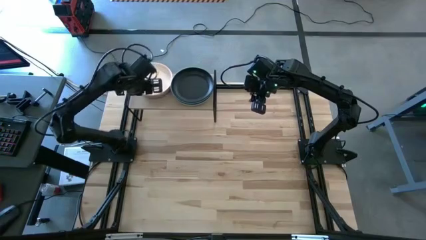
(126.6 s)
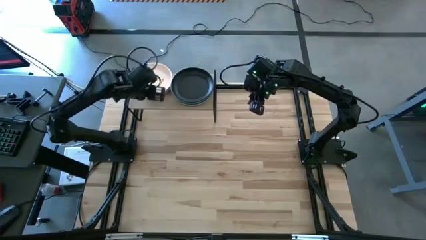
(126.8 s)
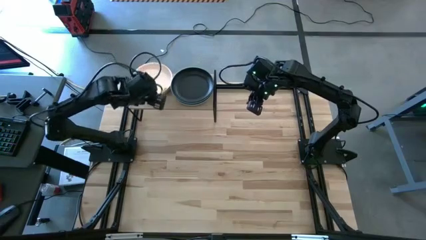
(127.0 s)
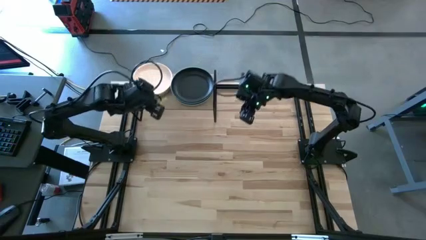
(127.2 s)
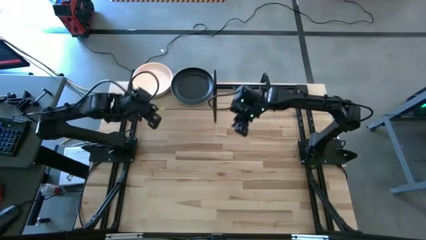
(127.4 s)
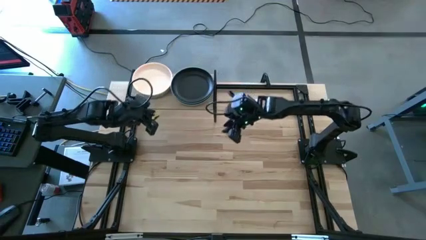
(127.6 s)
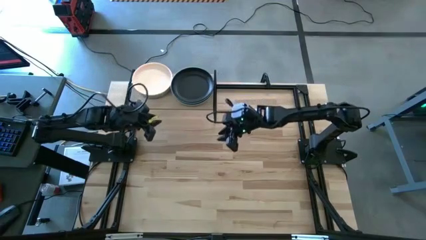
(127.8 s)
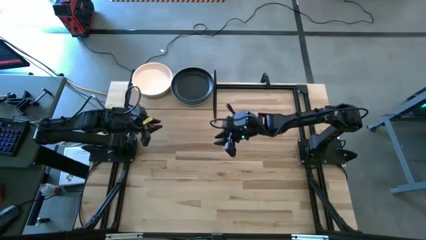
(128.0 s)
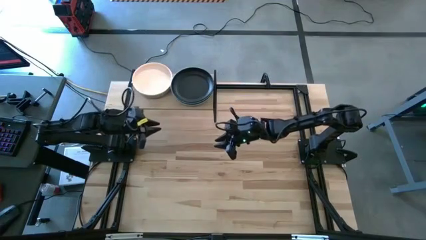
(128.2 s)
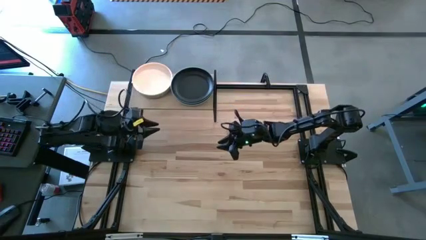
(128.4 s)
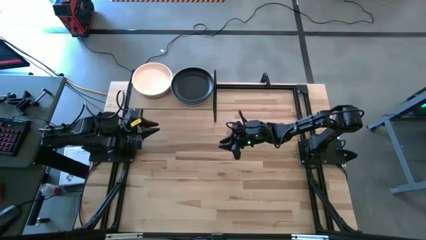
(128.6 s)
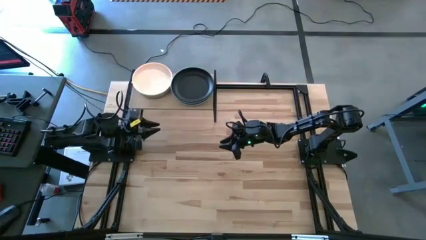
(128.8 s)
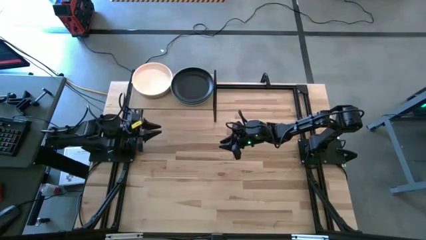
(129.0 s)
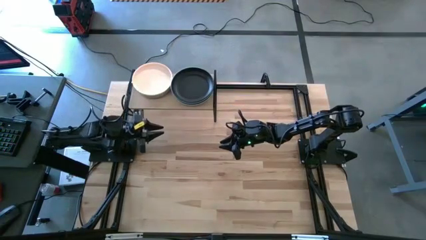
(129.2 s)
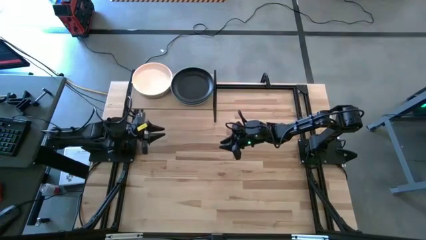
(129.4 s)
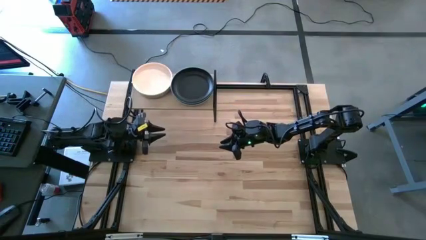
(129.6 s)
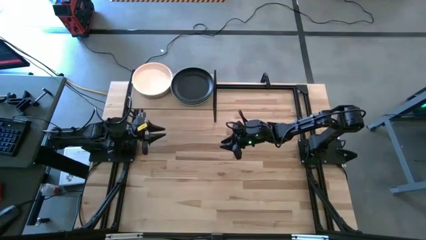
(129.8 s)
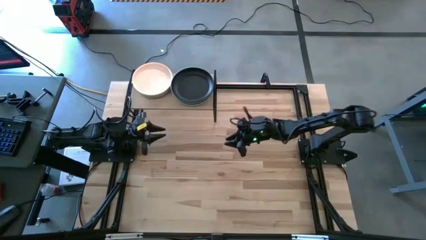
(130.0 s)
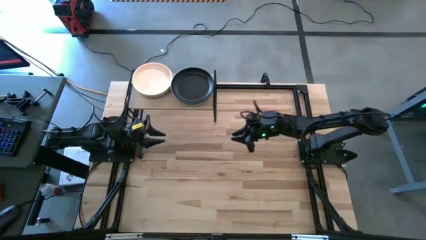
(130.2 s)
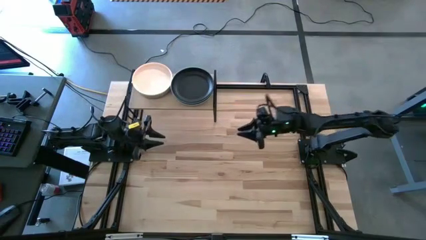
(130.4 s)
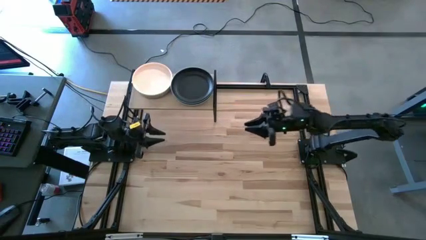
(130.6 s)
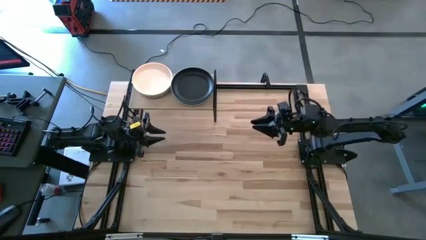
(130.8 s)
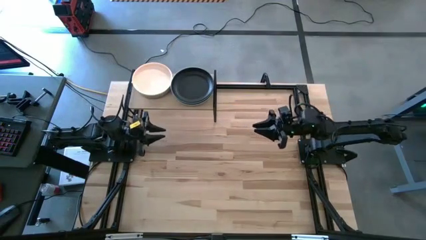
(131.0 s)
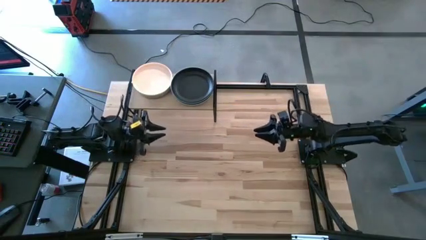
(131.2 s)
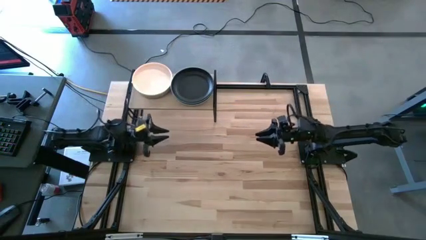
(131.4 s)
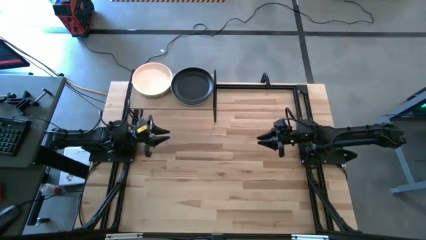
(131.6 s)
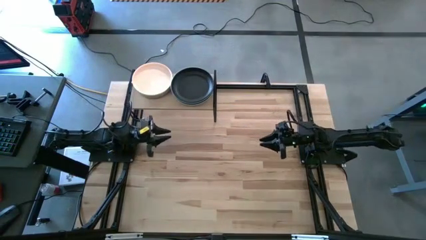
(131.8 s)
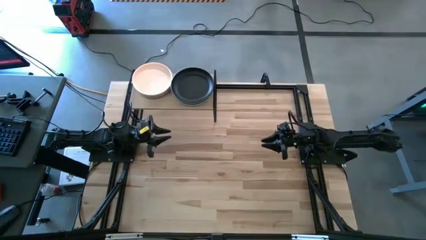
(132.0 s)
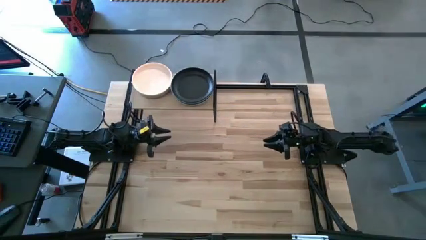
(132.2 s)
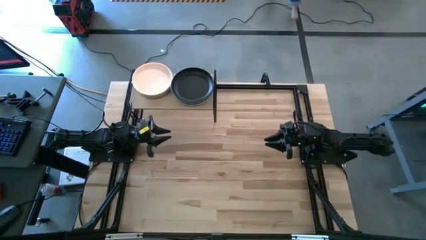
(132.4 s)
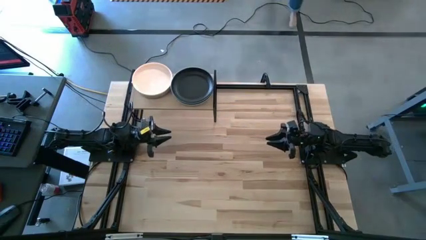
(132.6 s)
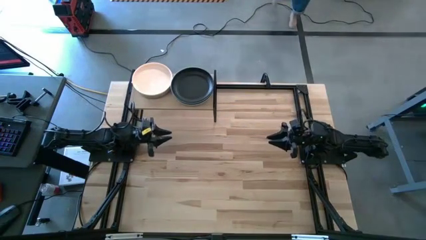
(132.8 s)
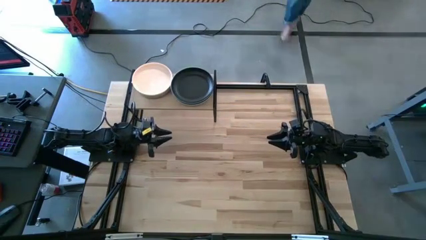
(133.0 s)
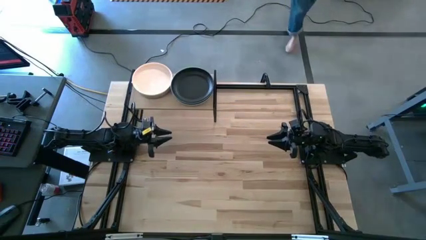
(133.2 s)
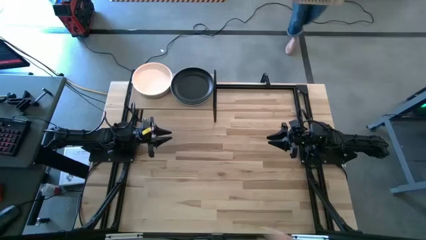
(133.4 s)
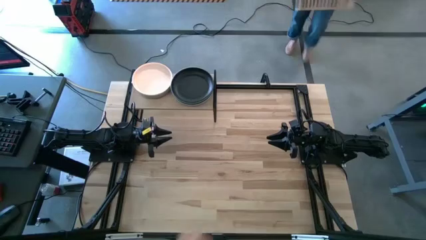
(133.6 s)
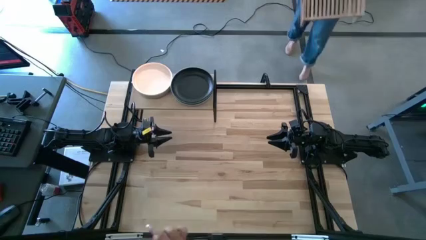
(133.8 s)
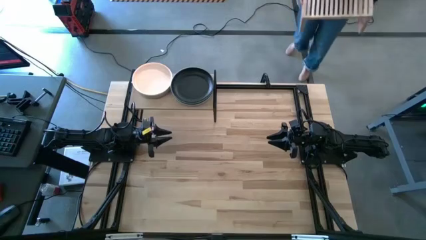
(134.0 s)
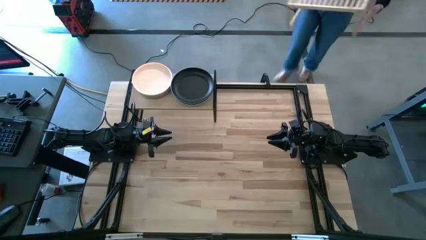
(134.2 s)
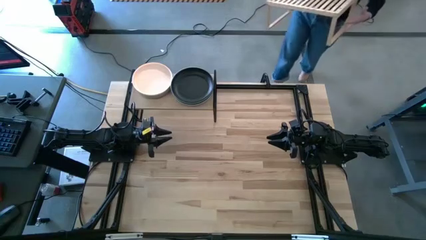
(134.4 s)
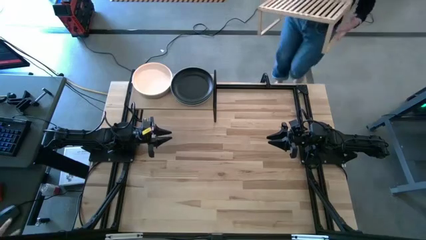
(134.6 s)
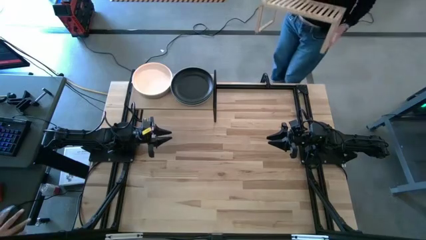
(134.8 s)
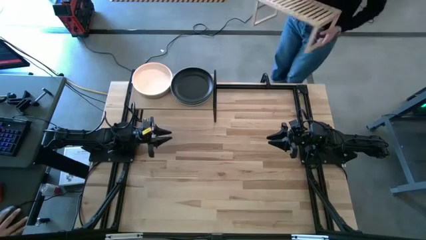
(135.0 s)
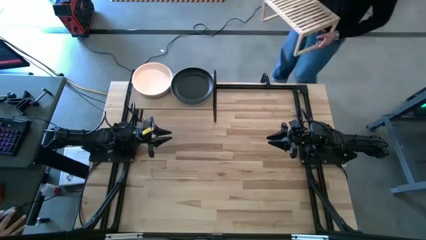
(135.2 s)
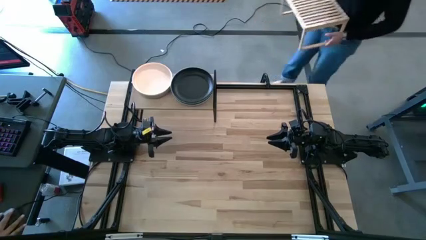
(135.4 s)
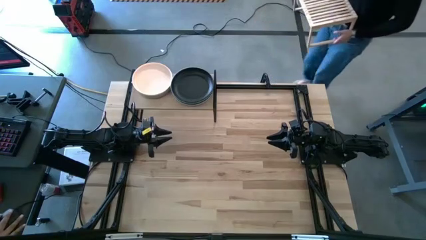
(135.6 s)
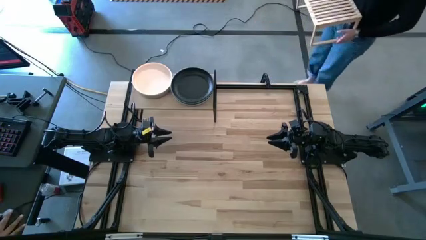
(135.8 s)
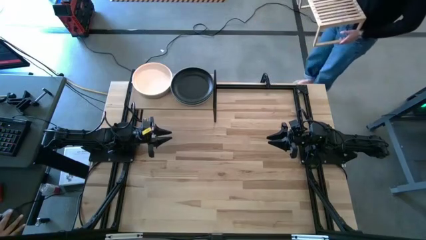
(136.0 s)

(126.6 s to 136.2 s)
Task: Place and stack plates onto a shelf
Return to Home Position

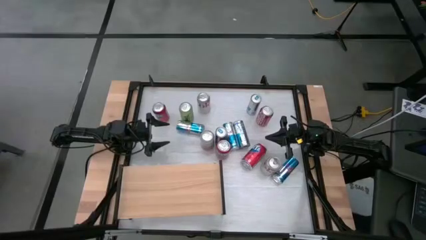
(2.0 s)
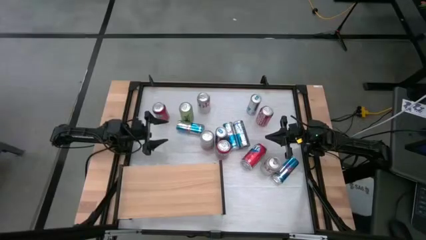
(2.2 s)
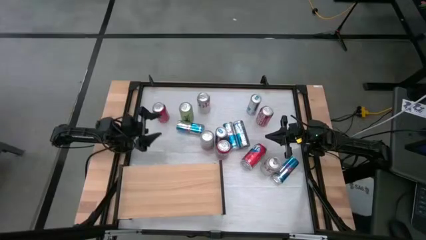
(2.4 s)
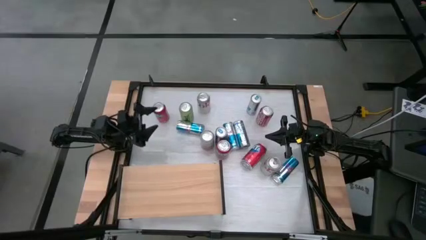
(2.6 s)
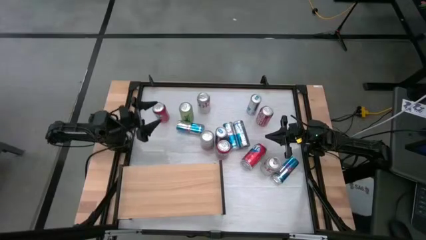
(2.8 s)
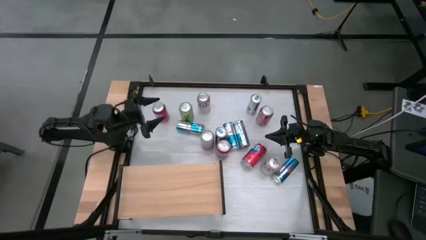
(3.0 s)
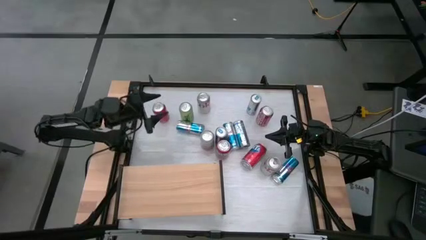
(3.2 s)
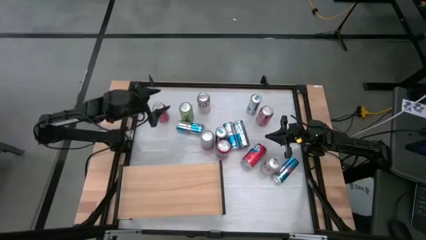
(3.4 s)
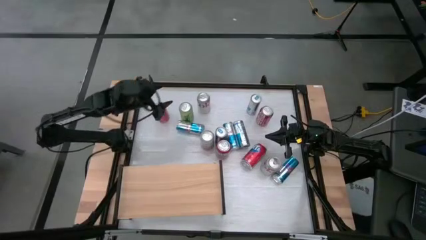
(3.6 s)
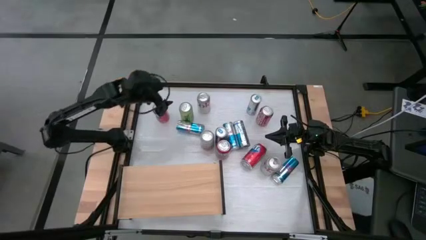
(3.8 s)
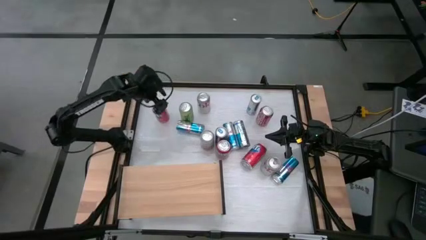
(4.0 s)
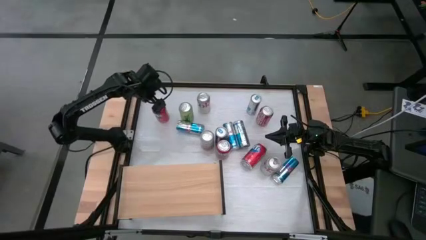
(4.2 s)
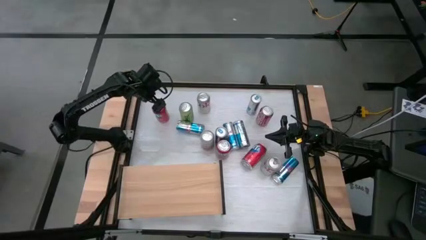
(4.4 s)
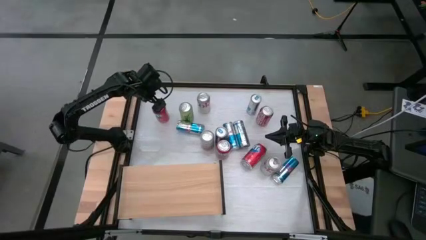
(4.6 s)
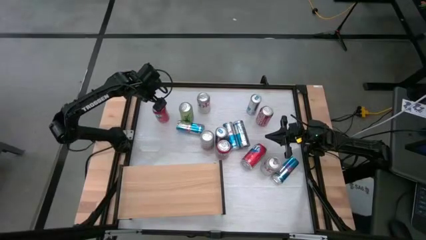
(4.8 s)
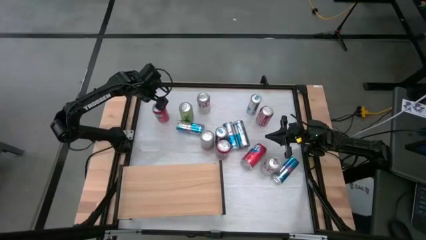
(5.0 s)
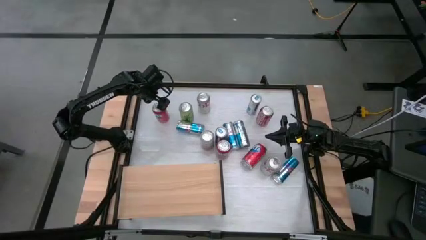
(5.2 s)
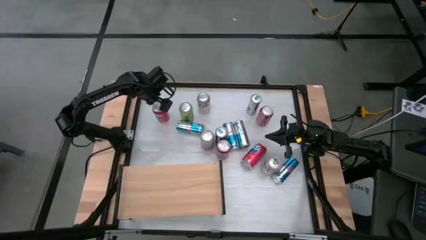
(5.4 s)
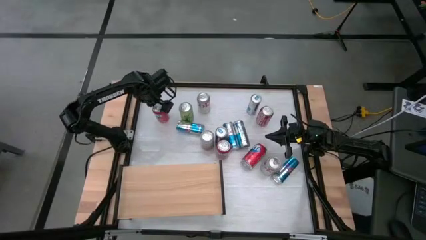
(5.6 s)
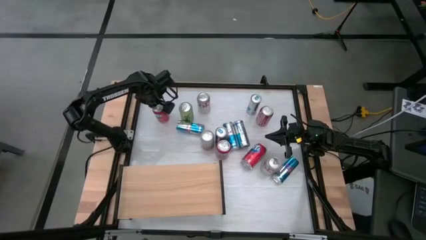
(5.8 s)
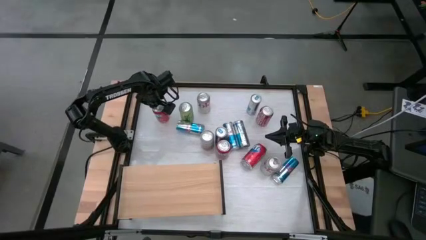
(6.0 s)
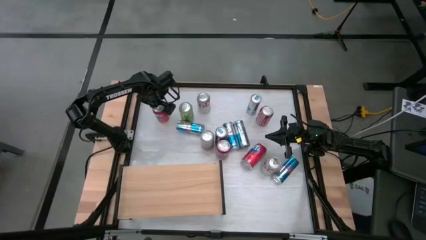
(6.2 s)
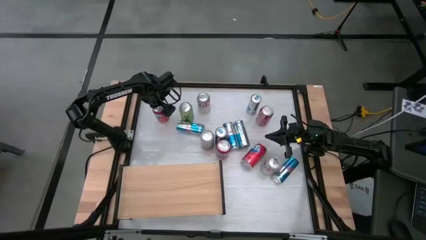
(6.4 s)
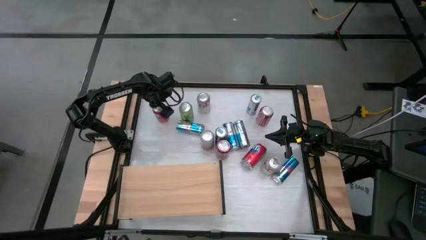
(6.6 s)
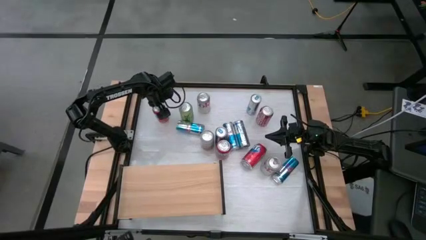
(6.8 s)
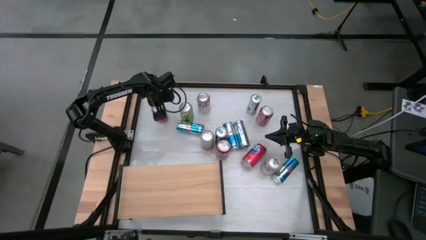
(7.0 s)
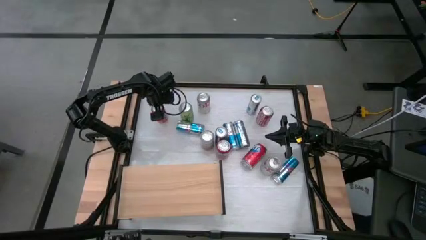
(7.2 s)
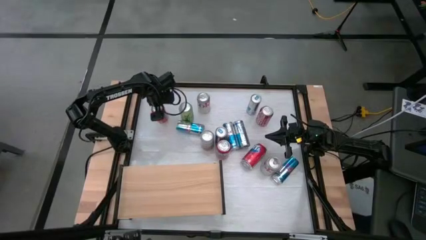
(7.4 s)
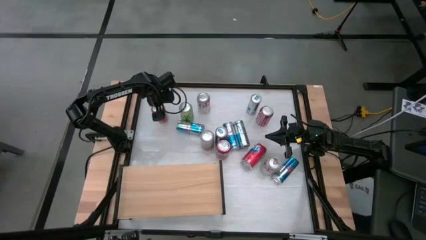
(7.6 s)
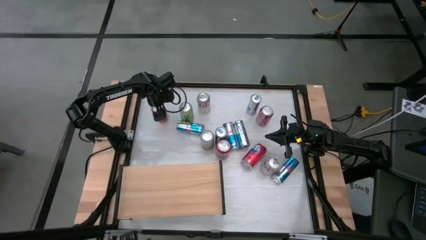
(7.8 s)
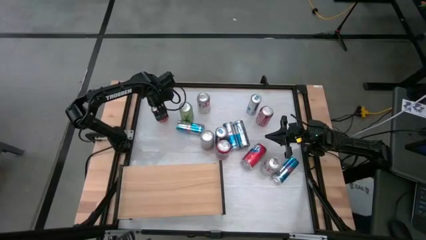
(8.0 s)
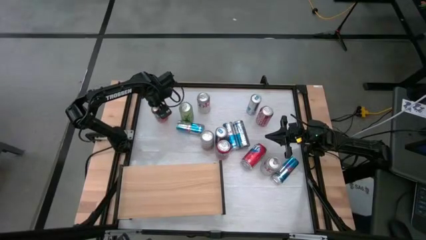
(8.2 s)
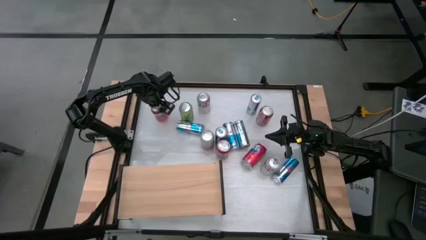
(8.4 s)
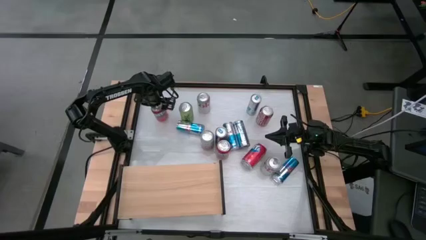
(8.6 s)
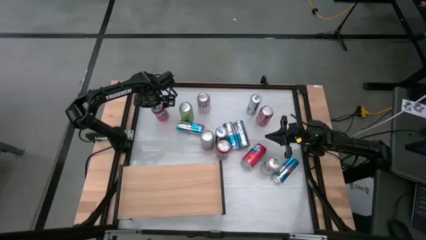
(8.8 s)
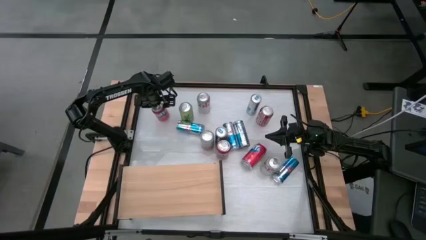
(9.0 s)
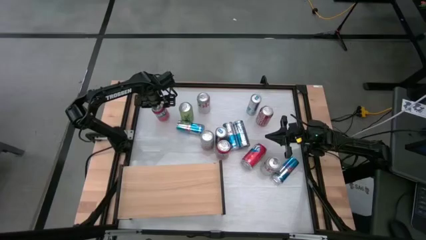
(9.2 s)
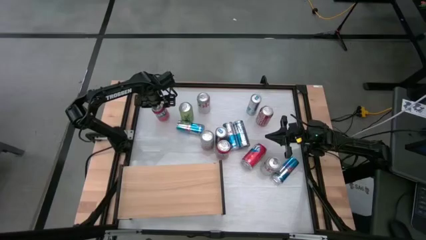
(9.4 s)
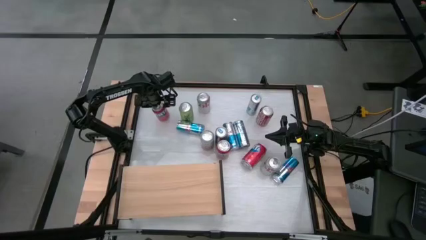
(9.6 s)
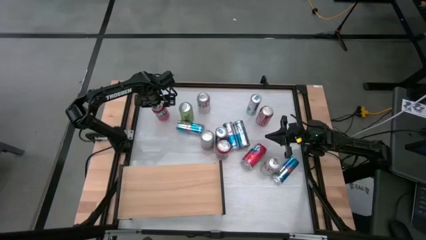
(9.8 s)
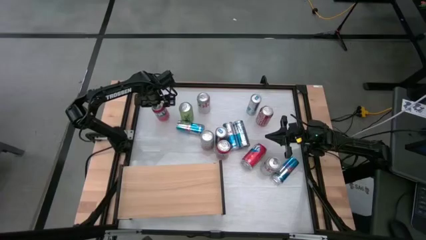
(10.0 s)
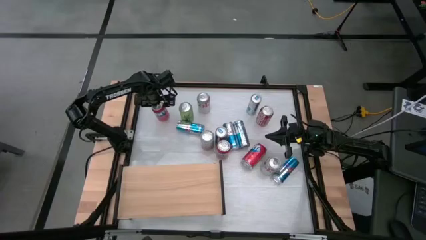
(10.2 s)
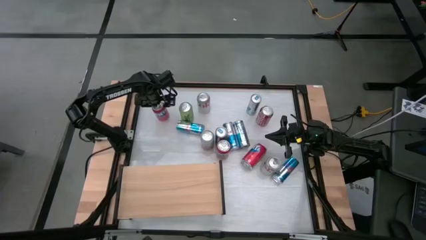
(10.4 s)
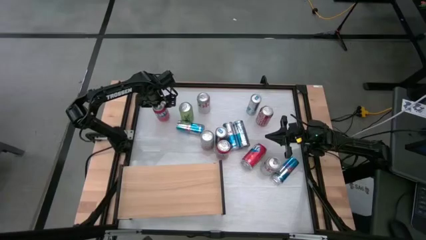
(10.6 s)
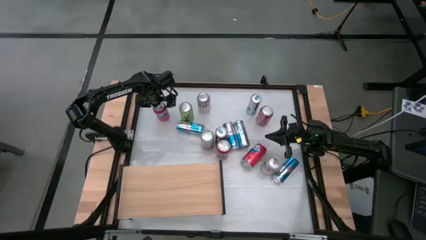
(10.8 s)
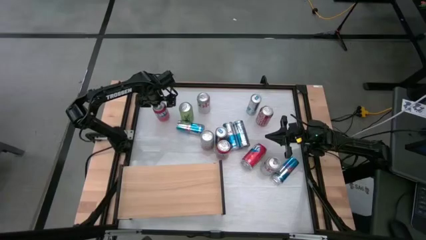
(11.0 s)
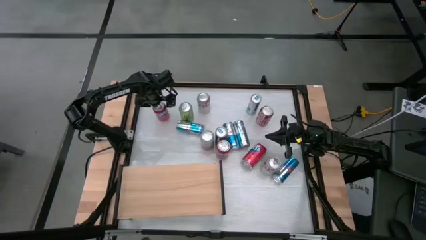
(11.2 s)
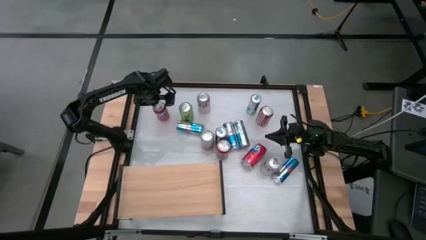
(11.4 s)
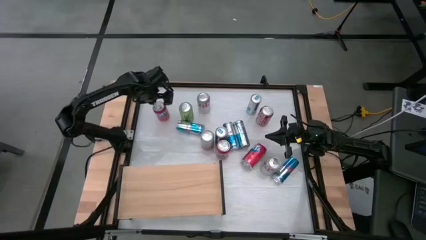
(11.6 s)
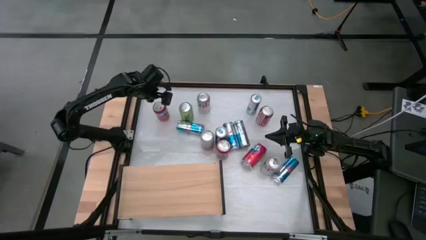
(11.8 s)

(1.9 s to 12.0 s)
Task: Place canned beverage on shelf
Put the orange soda can on the shelf
